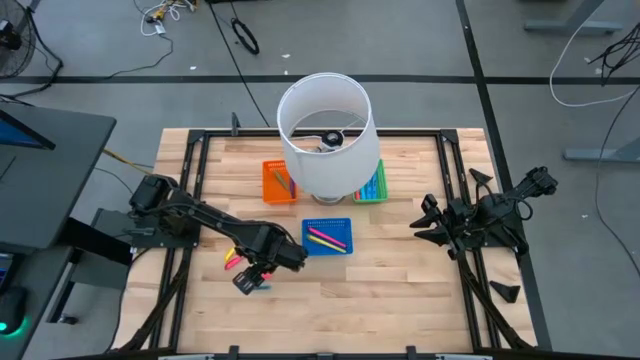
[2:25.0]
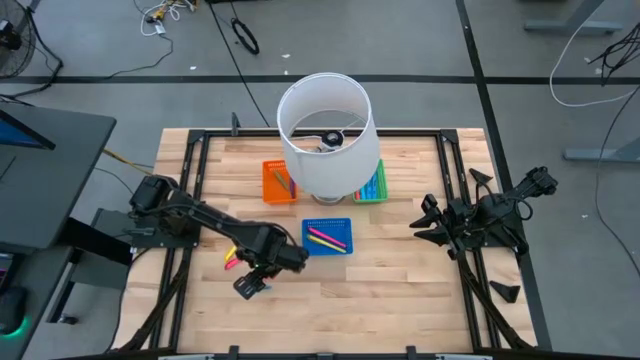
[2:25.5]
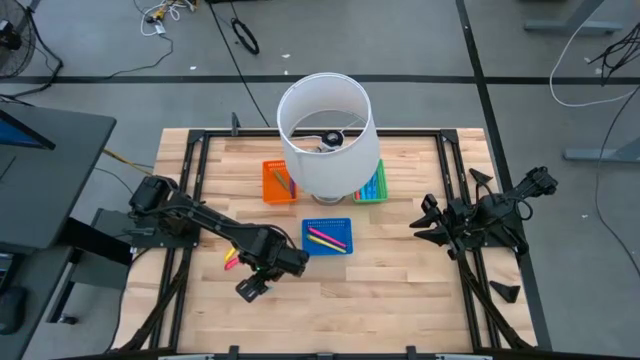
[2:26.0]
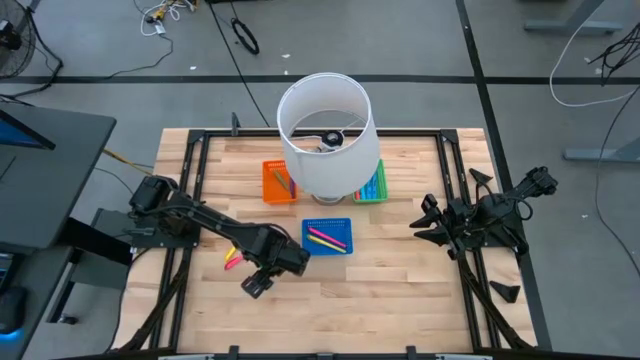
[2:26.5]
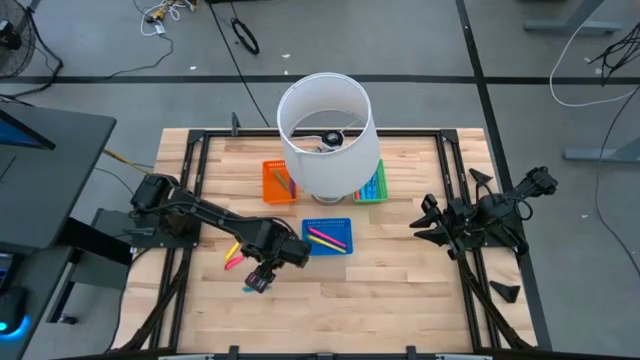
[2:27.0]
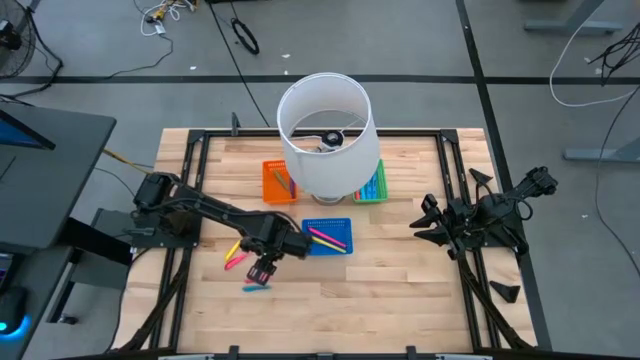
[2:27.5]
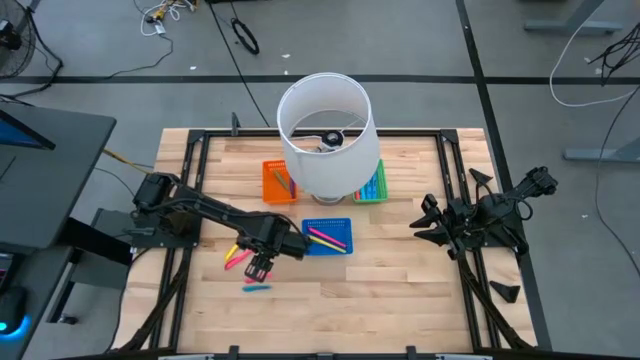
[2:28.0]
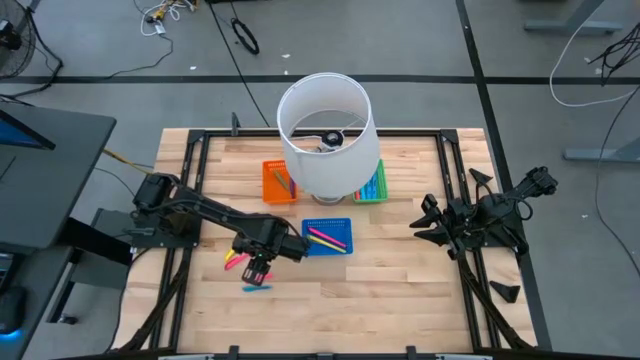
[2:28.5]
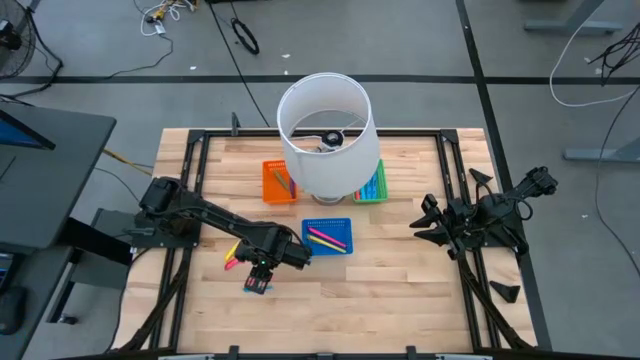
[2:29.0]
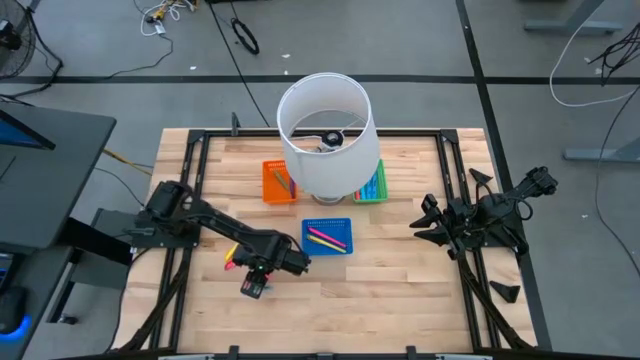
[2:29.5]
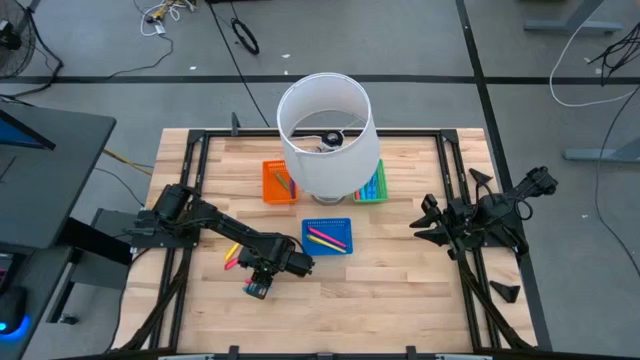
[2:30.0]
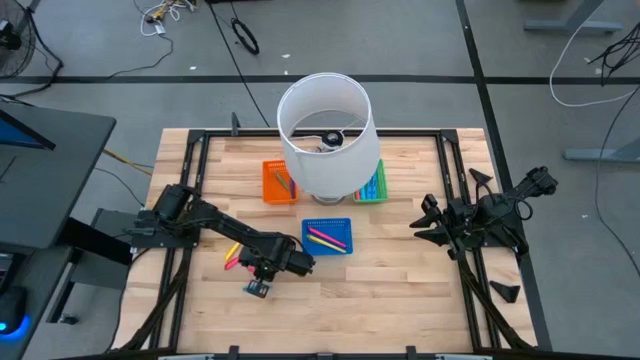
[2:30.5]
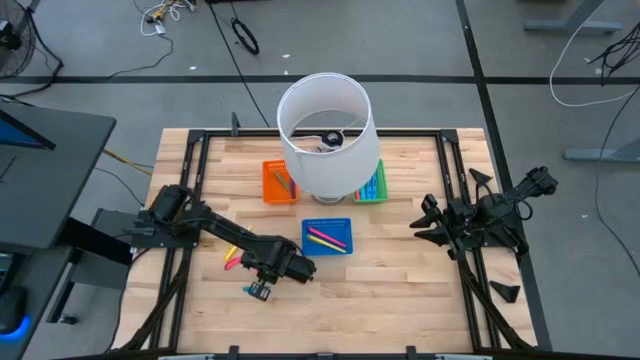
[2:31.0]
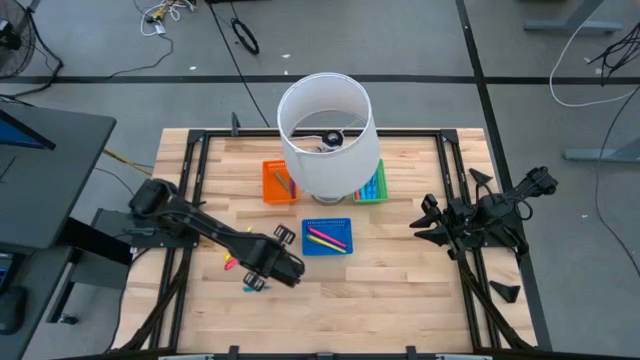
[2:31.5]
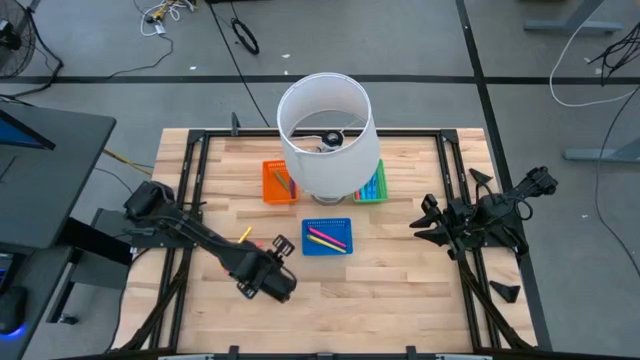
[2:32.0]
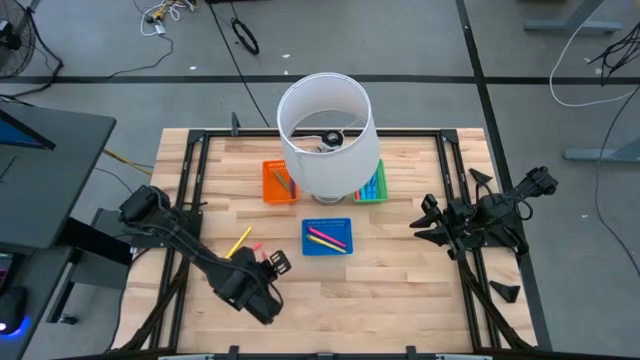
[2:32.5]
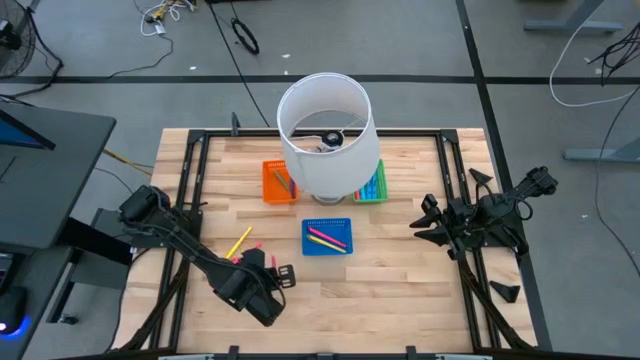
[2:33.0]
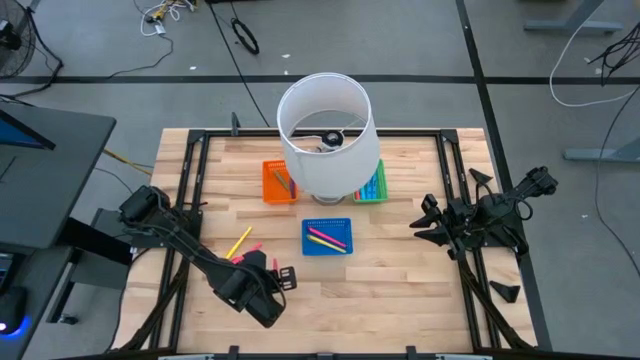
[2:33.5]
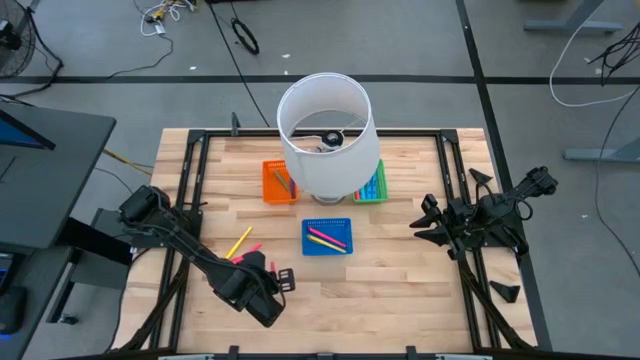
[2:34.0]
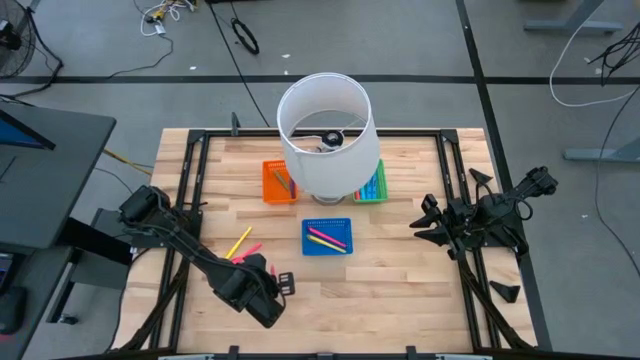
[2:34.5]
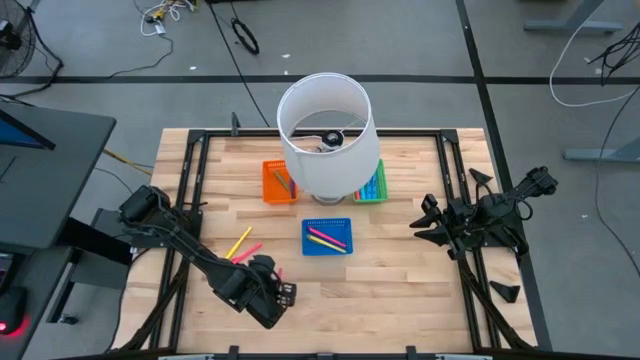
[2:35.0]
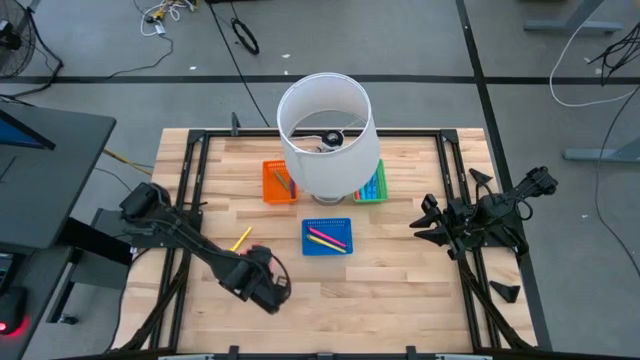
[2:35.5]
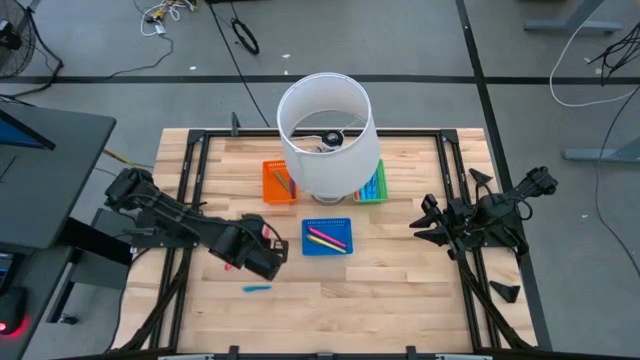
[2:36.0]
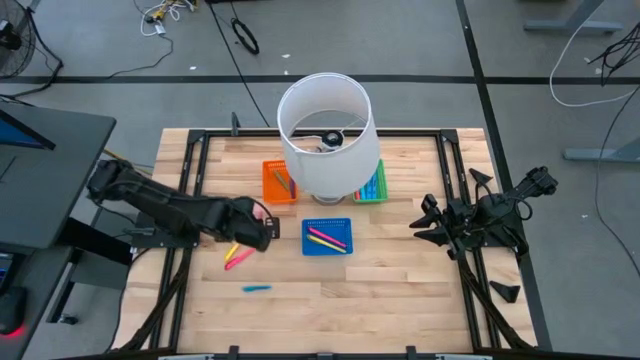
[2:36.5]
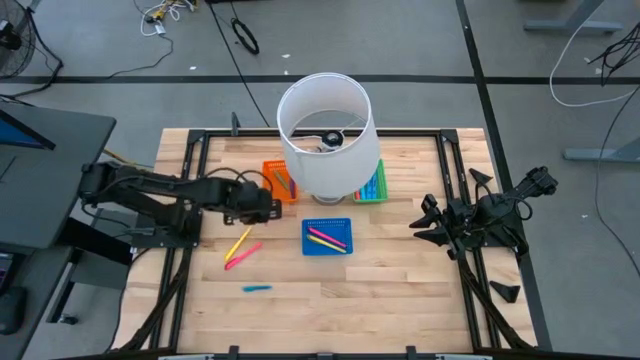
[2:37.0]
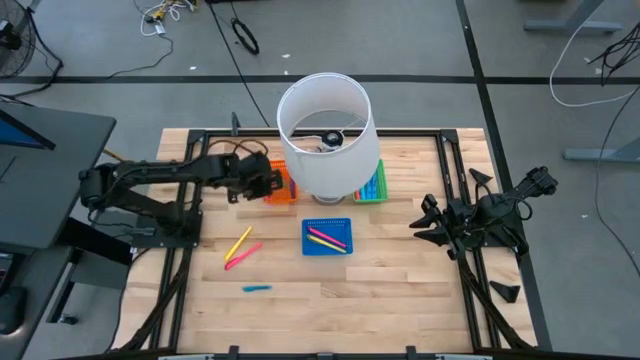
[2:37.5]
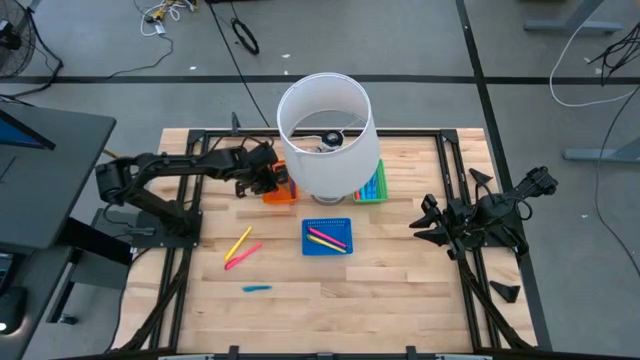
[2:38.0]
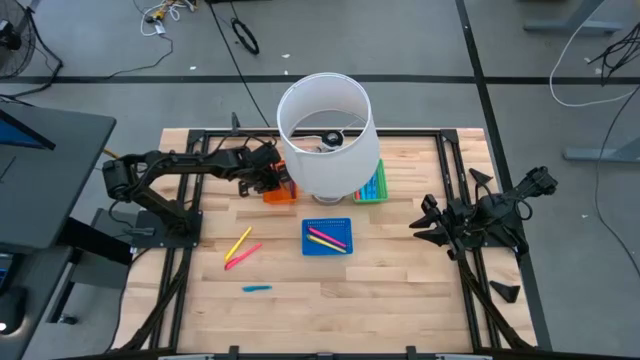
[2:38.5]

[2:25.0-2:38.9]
Task: Pick & Place Markers
Put the pink small highlighter pen into the orange bin

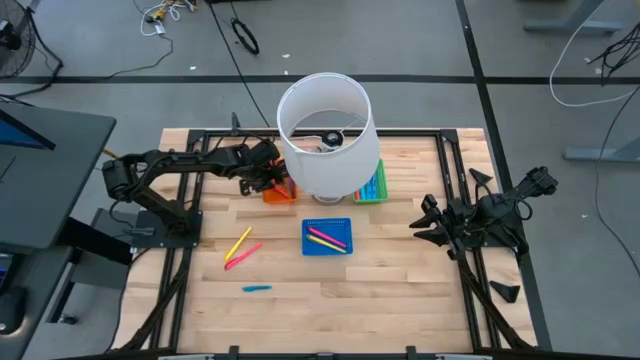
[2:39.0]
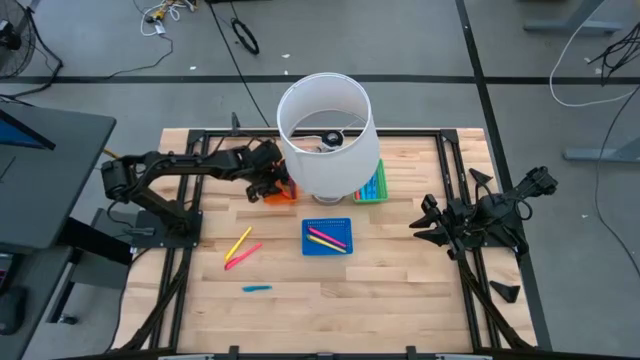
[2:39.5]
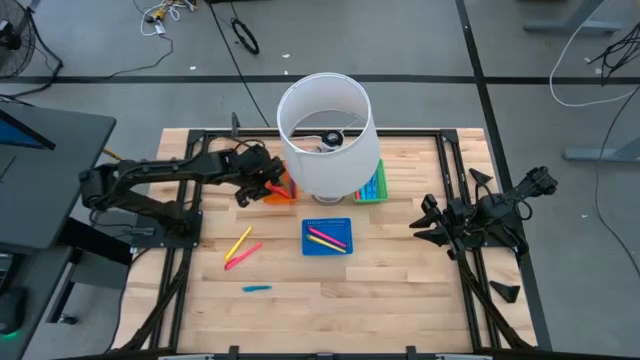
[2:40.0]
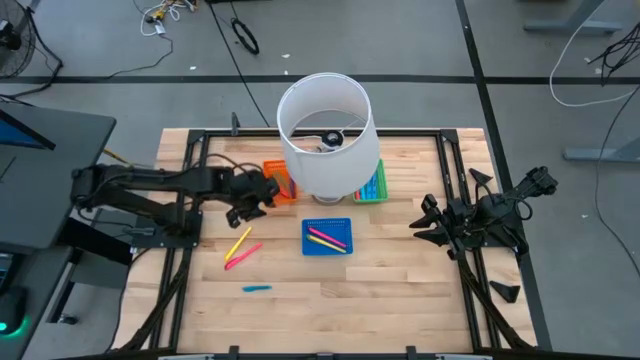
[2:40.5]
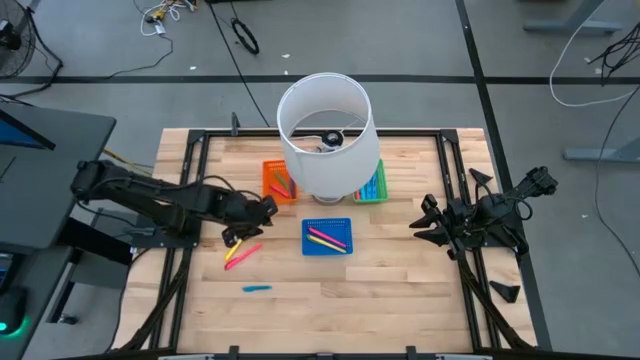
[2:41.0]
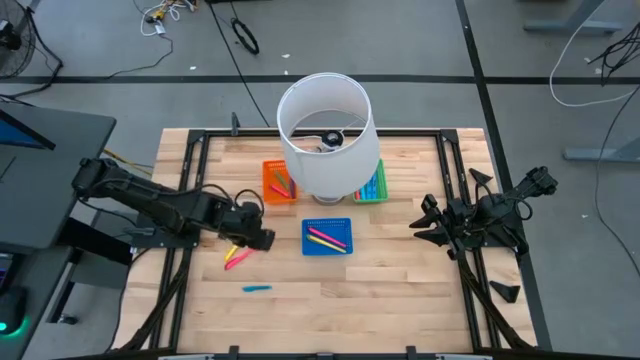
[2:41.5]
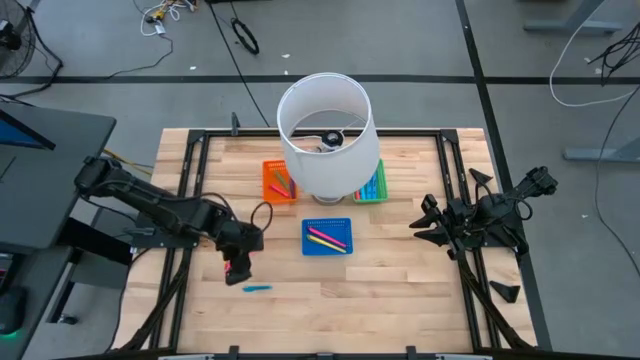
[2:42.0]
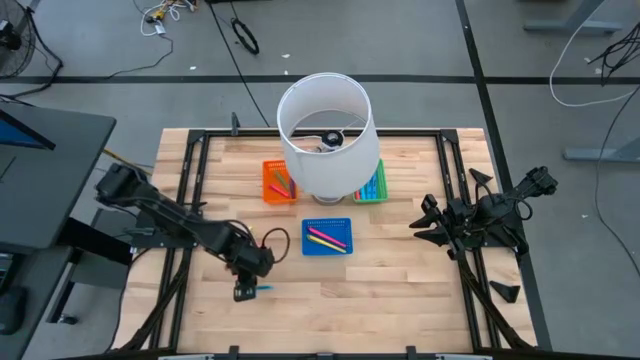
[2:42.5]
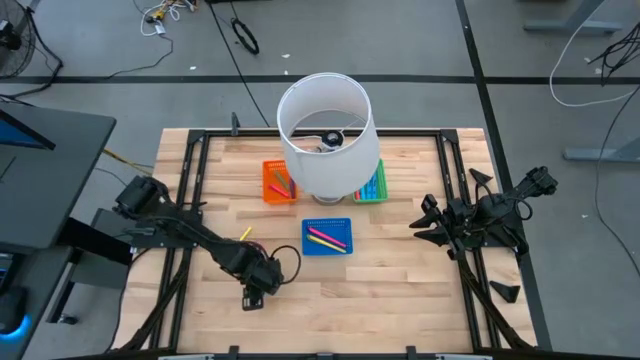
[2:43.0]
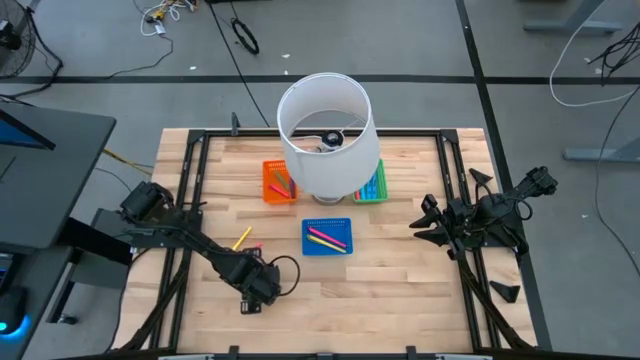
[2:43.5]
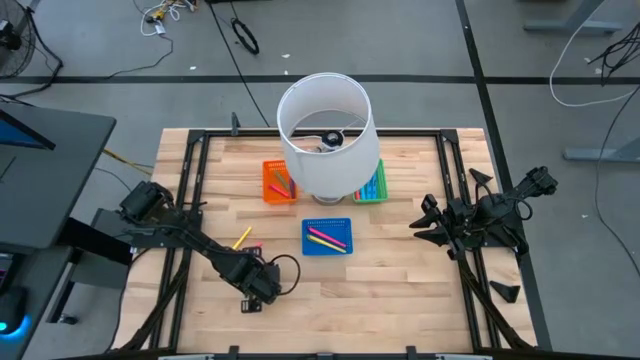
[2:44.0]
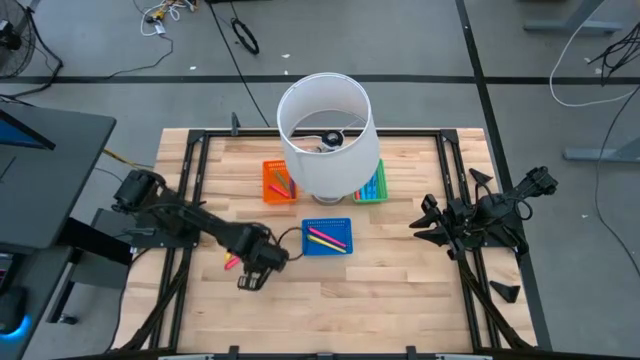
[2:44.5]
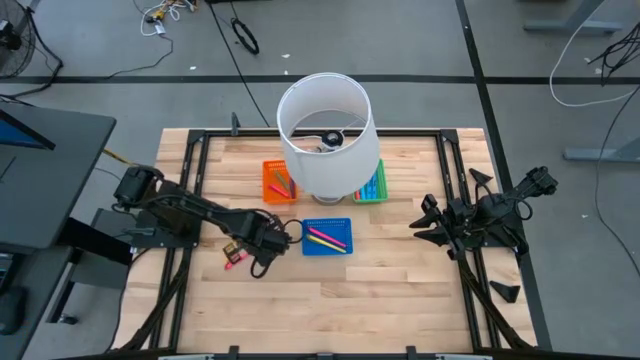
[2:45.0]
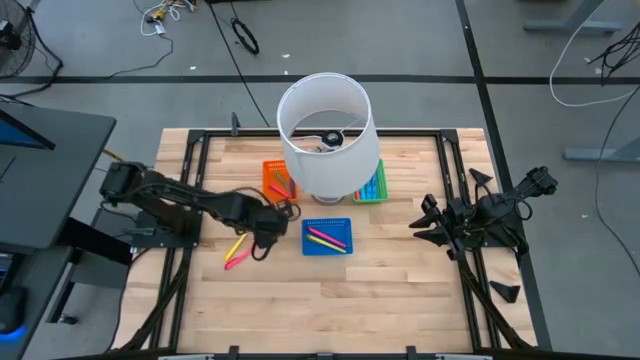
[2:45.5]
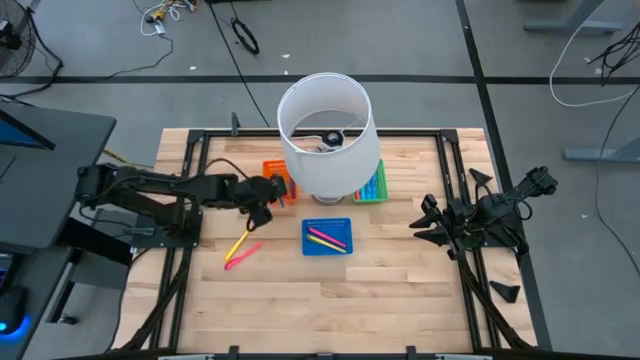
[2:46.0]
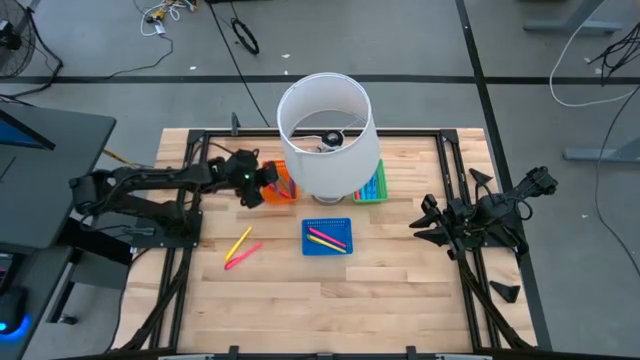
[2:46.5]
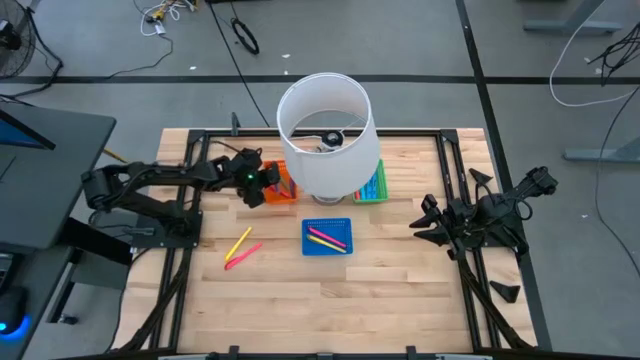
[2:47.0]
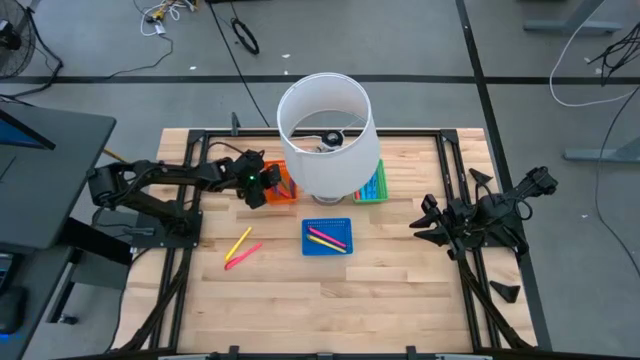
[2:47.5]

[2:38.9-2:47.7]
Put the blue small highlighter pen into the orange bin
